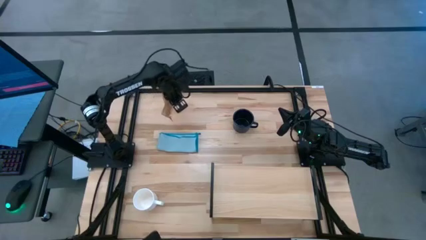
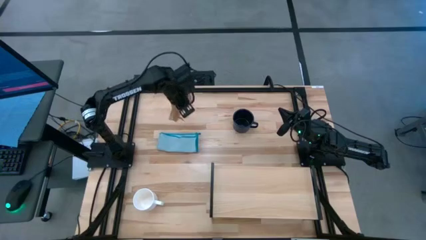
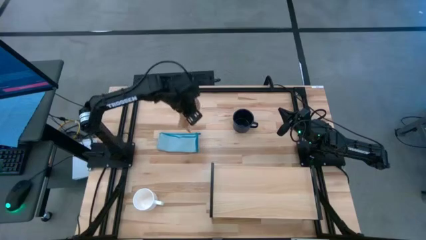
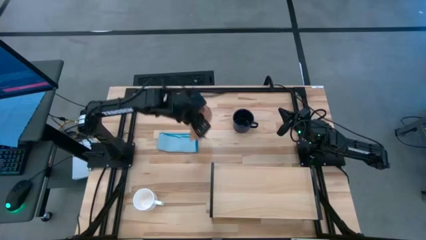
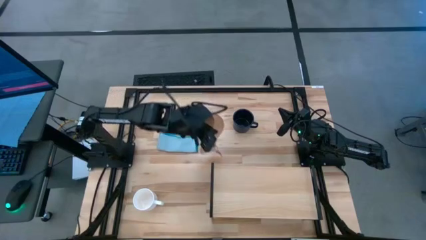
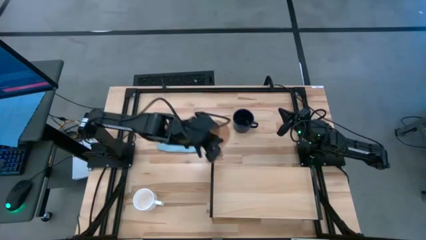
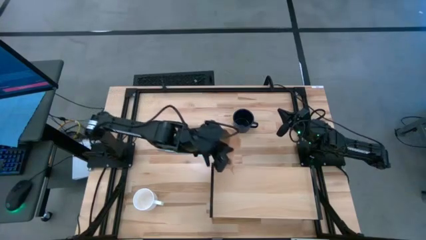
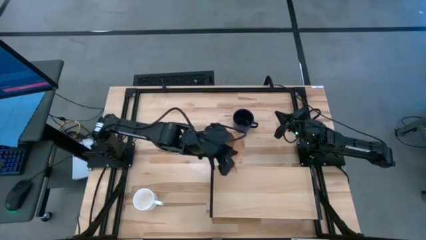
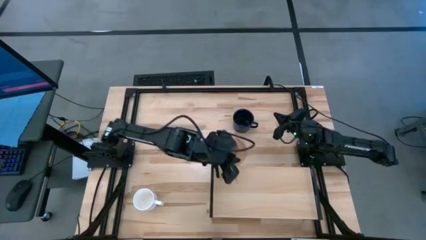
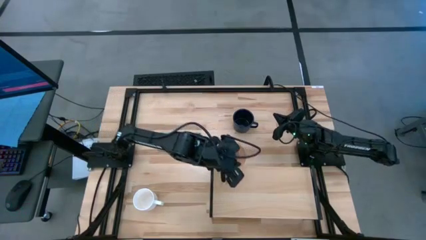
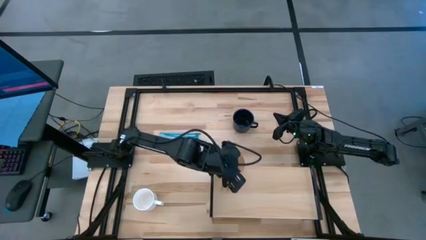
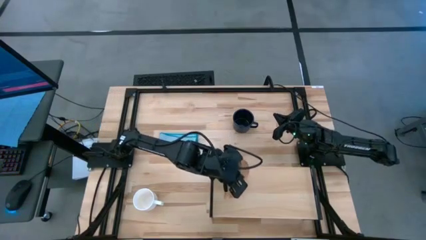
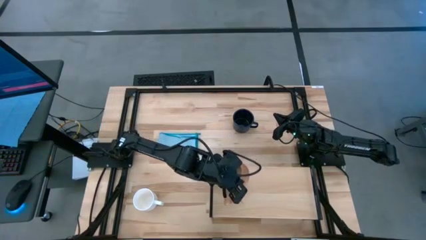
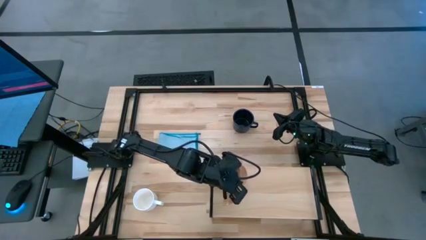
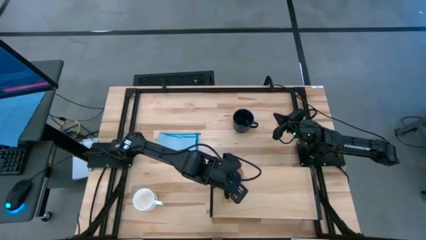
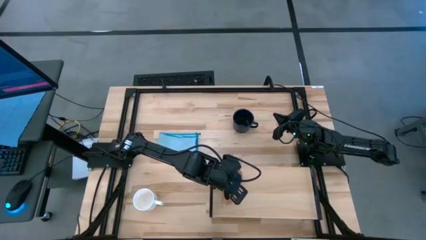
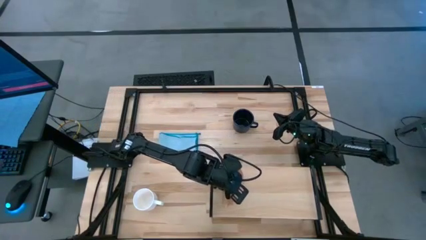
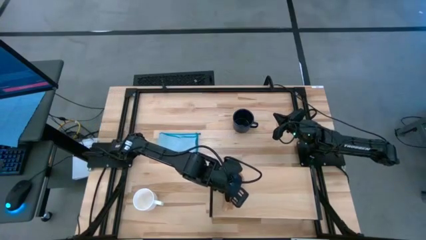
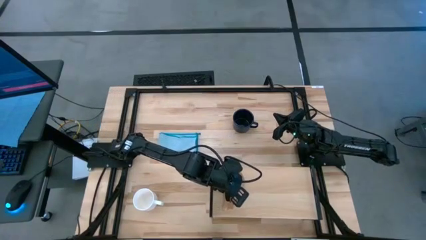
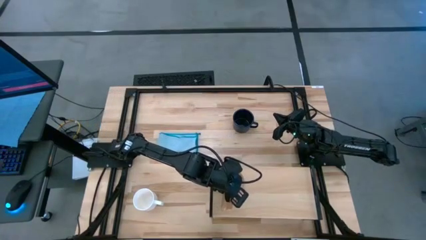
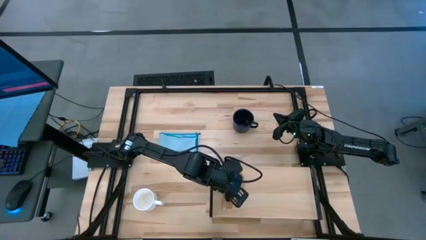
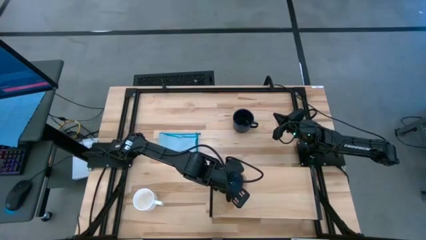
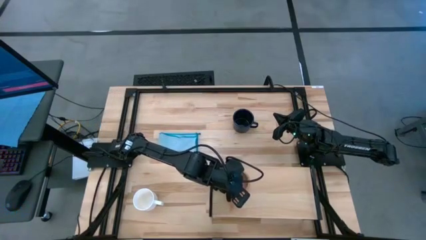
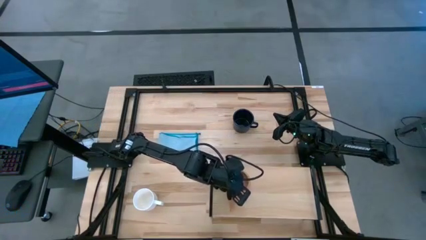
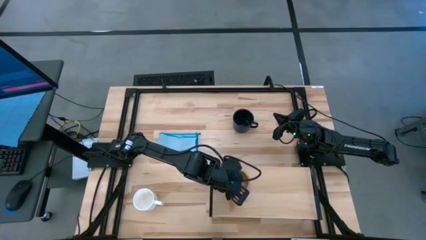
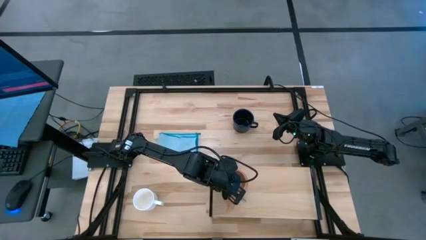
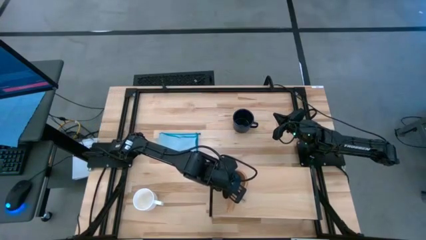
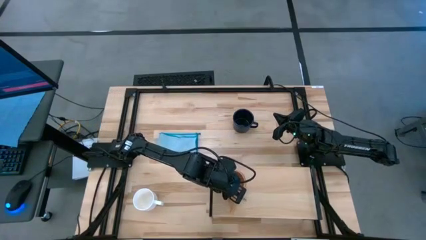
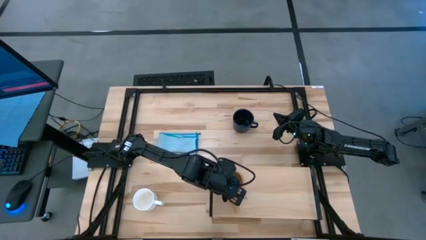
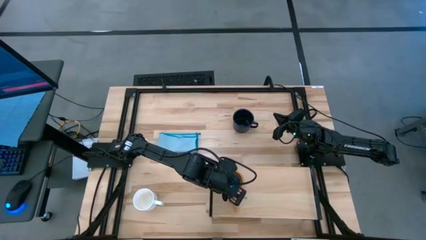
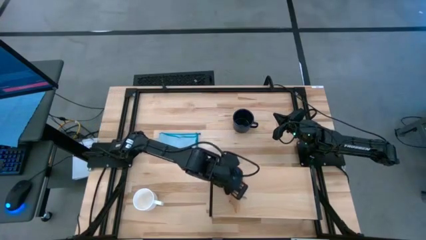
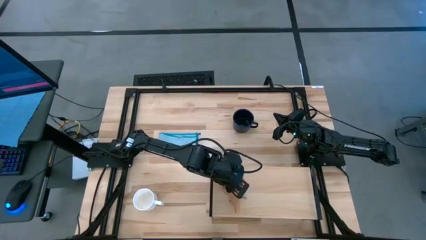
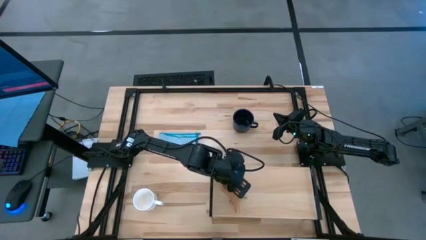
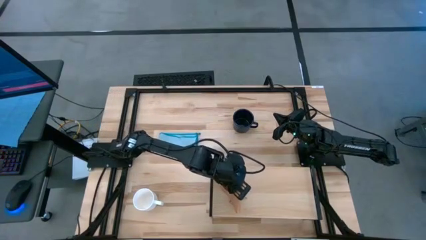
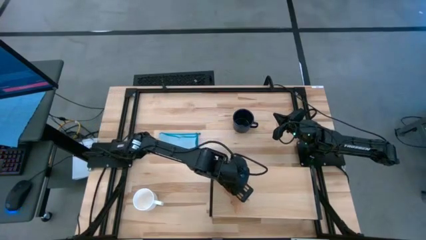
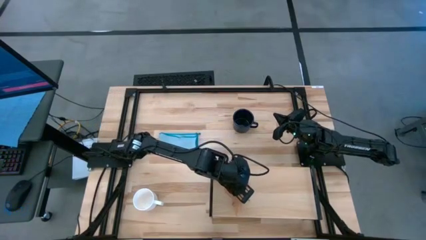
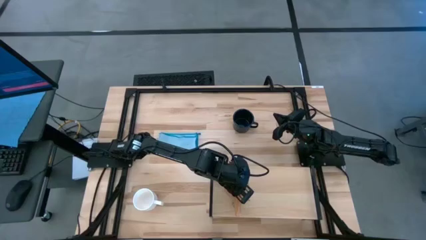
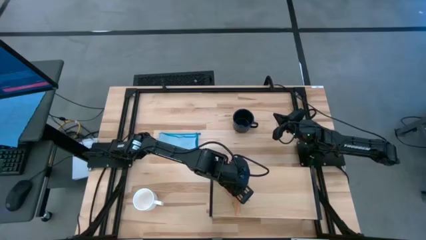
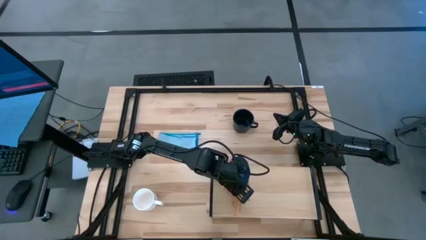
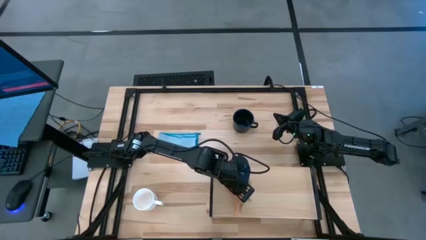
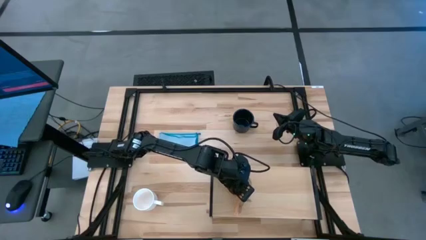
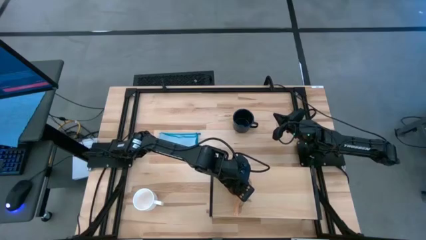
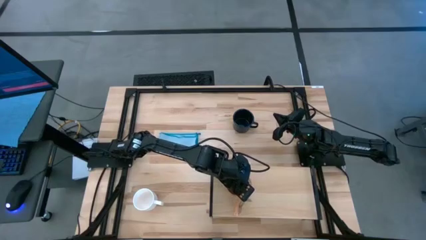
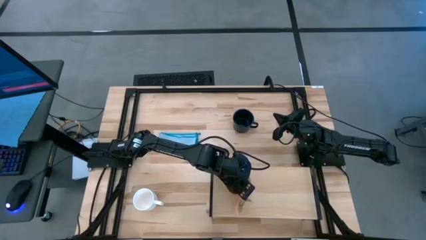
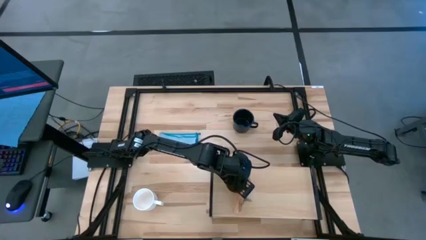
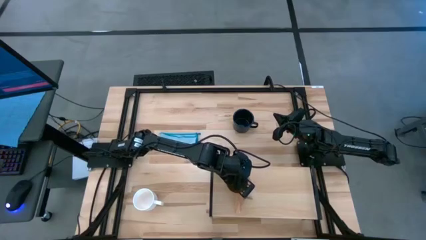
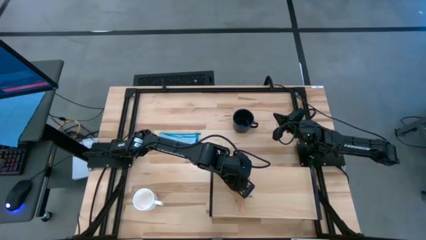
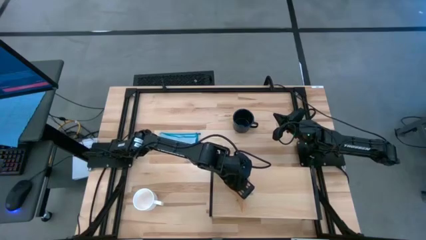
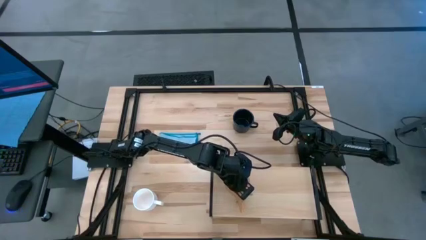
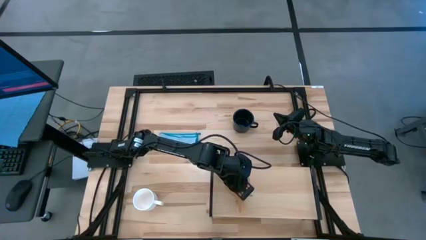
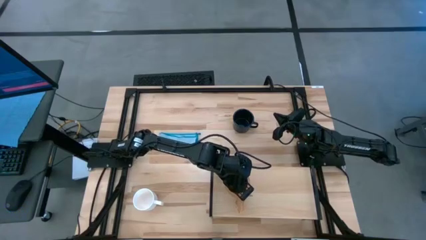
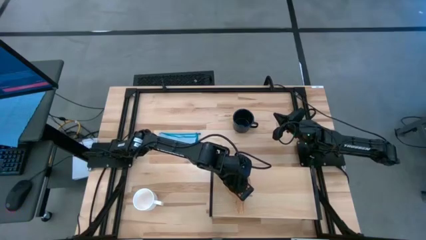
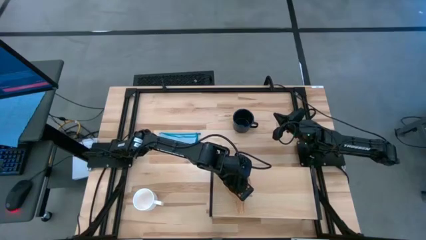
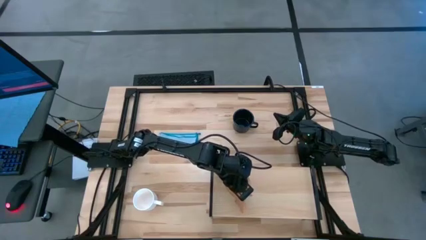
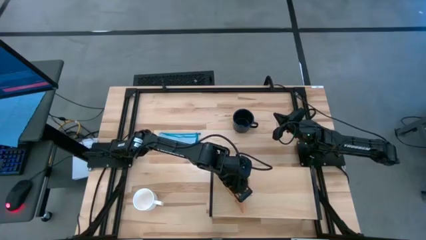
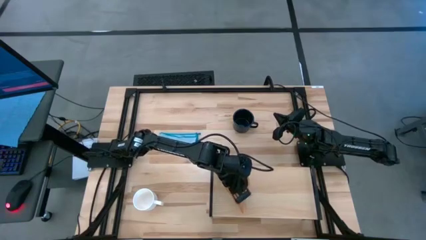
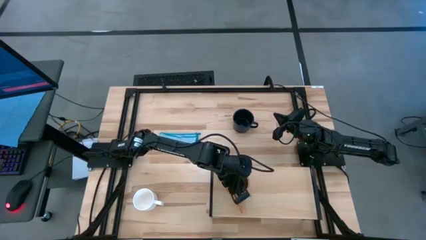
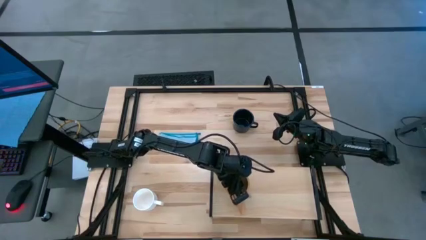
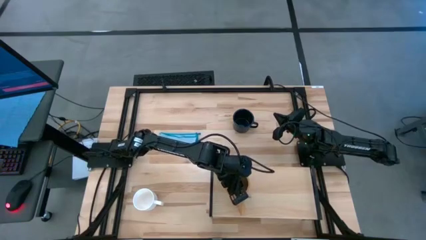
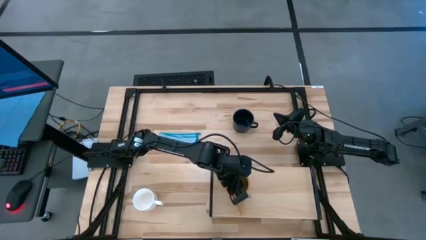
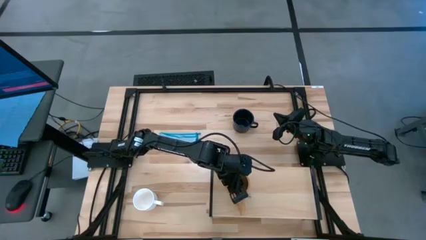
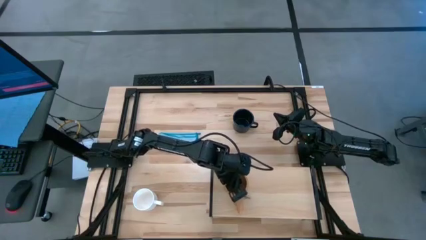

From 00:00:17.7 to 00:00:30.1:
Task: Stack small to large cups/mugs on shelf
Put the brown mug on the shelf

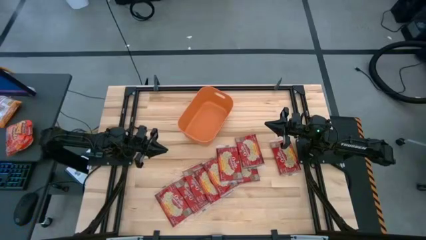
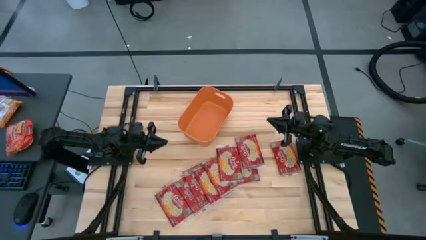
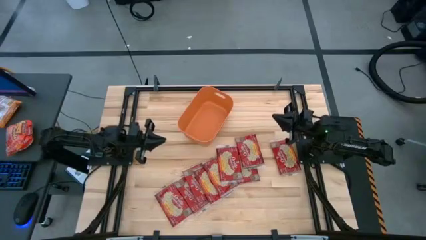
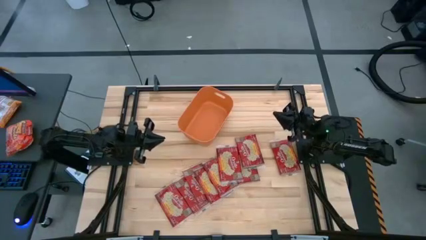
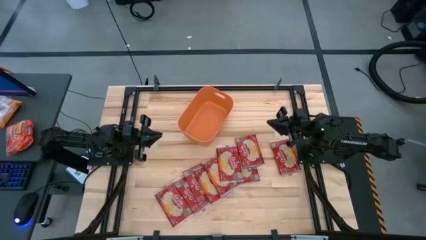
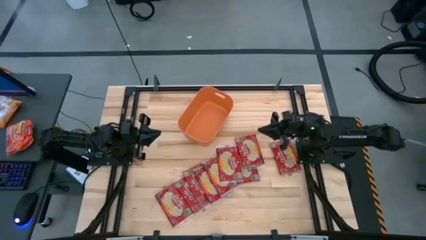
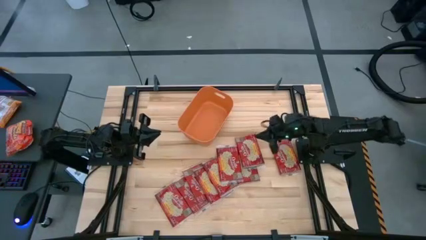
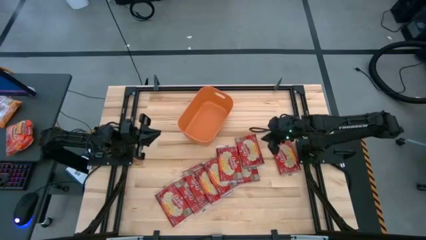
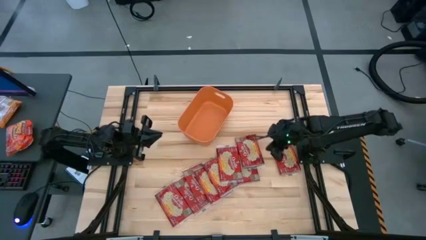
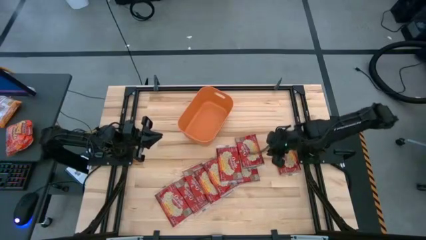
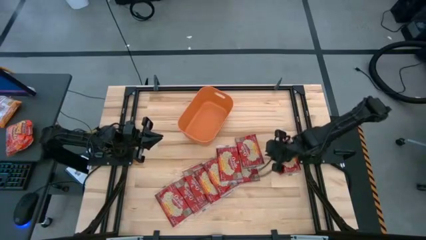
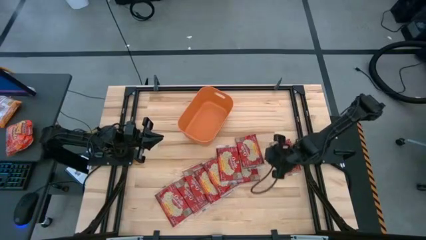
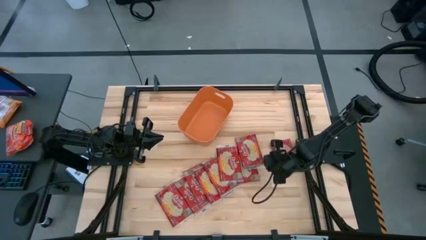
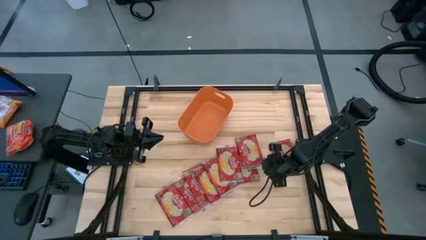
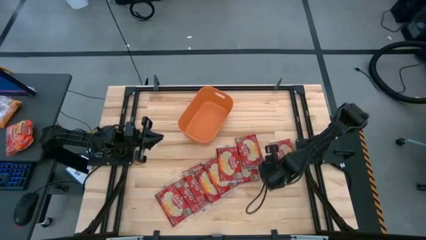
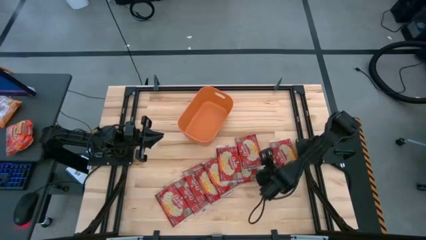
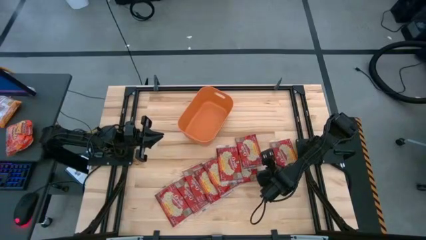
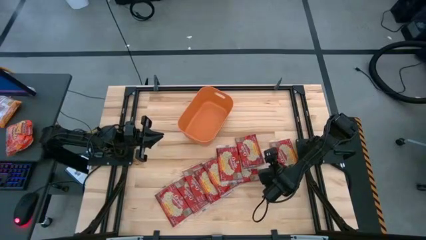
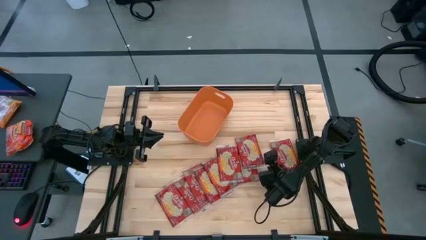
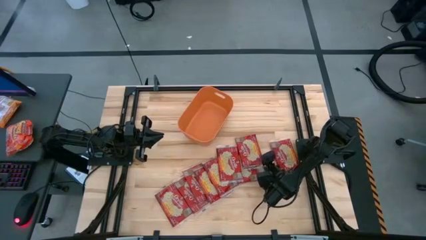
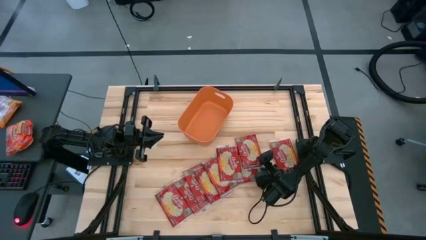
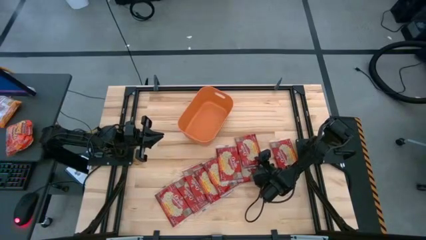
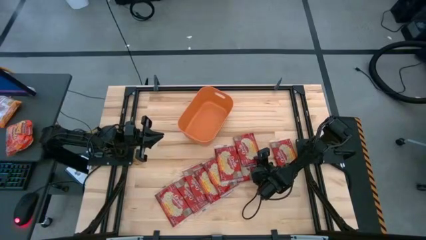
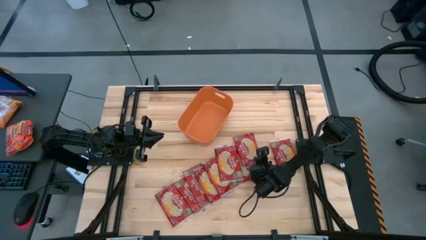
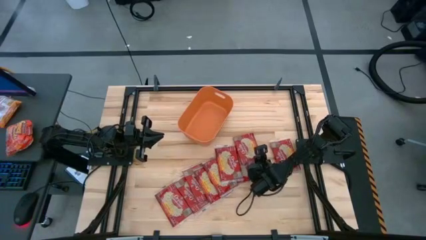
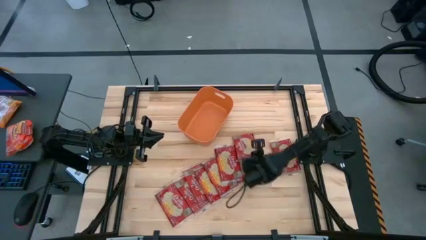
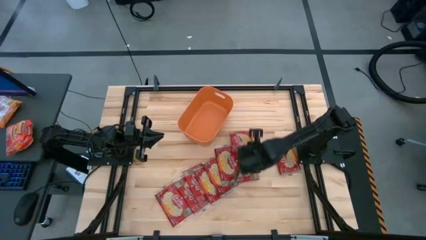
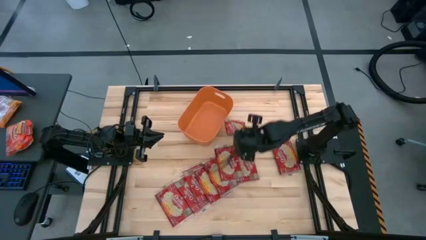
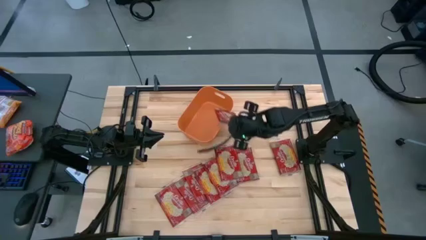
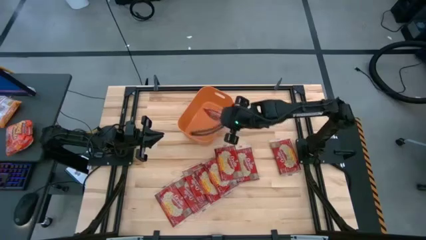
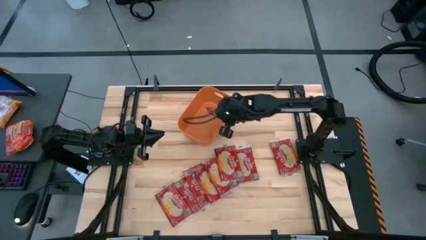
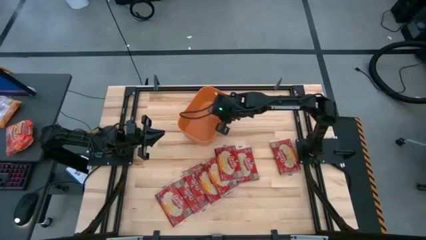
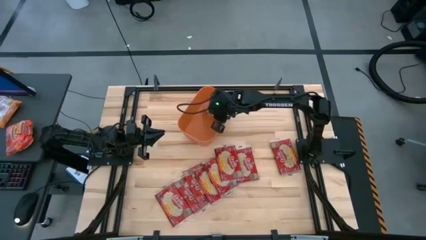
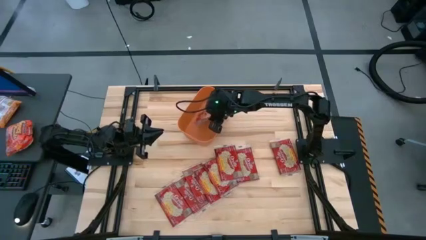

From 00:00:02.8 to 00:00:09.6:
Task: Sort popcorn bags into baskets
Put the red popcorn bag into the orange bin
